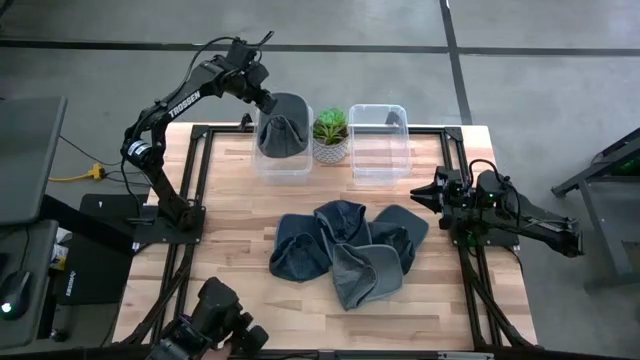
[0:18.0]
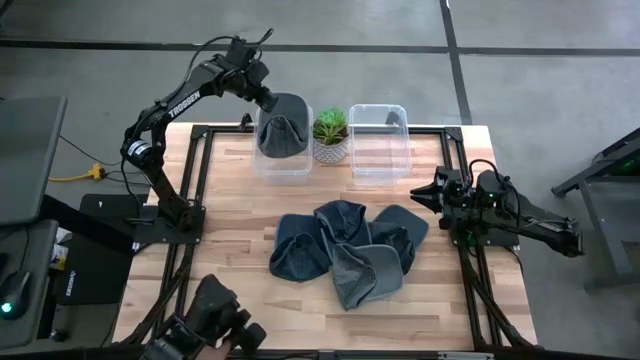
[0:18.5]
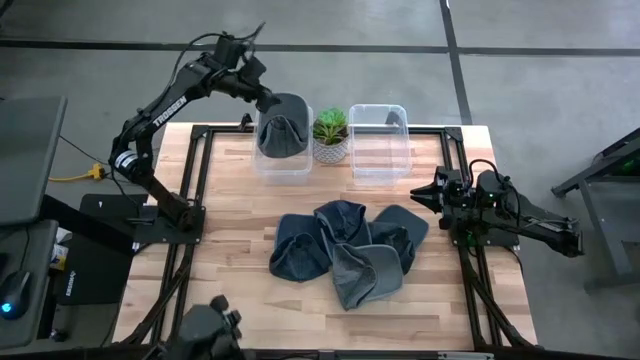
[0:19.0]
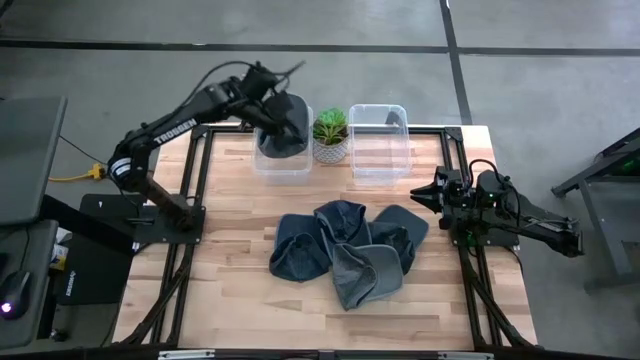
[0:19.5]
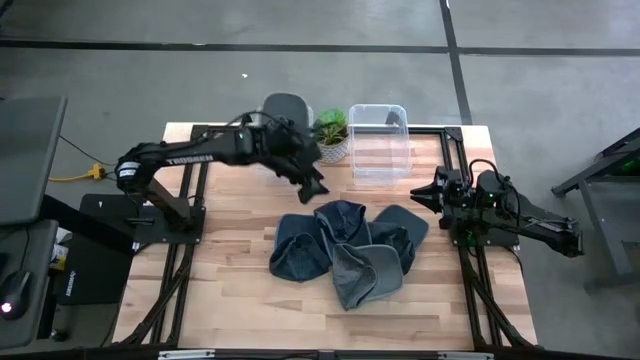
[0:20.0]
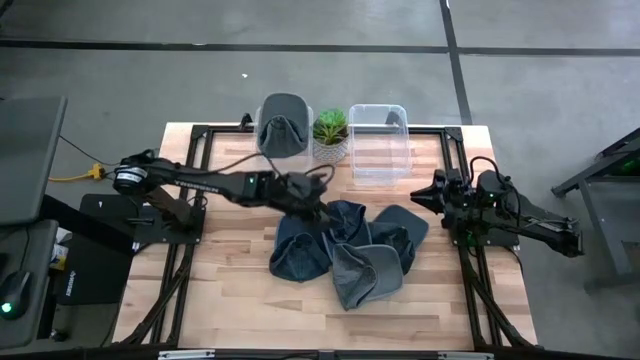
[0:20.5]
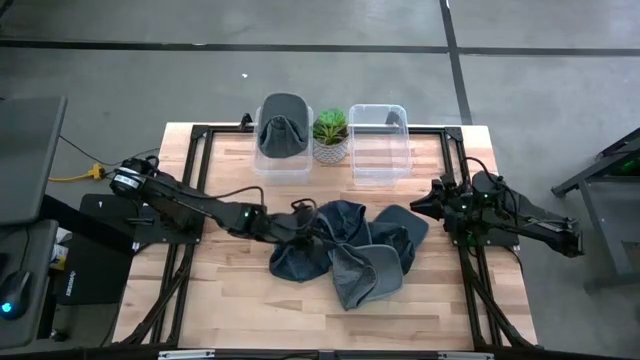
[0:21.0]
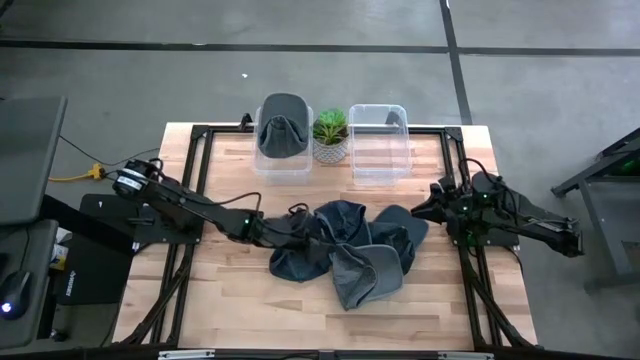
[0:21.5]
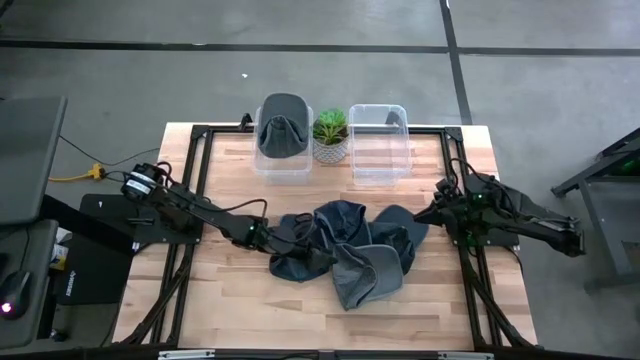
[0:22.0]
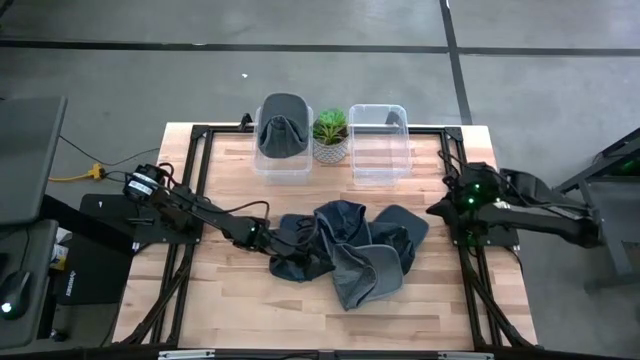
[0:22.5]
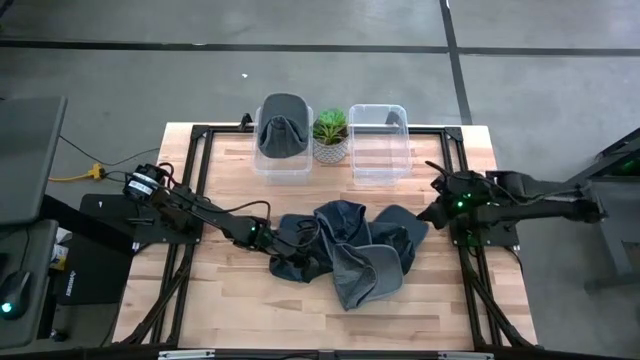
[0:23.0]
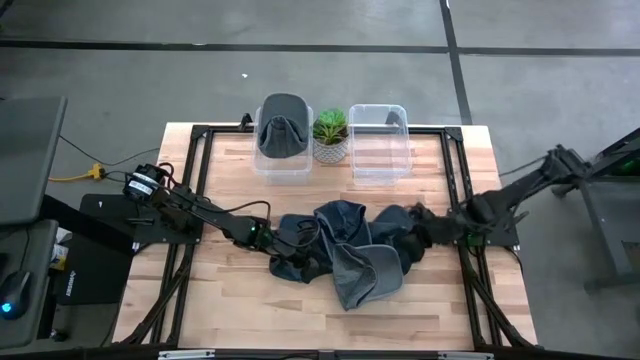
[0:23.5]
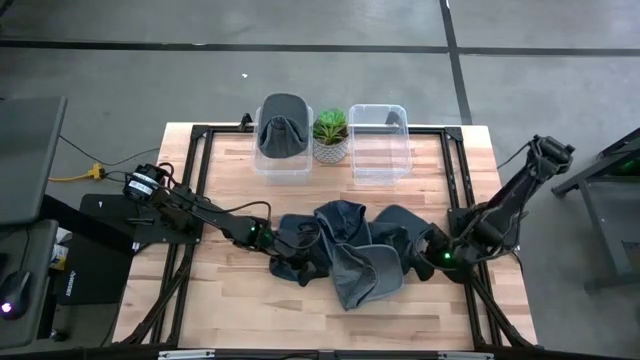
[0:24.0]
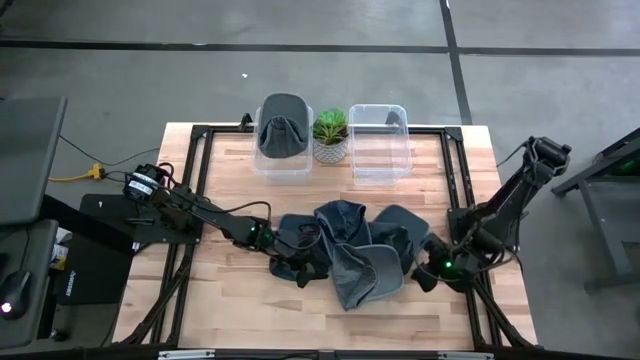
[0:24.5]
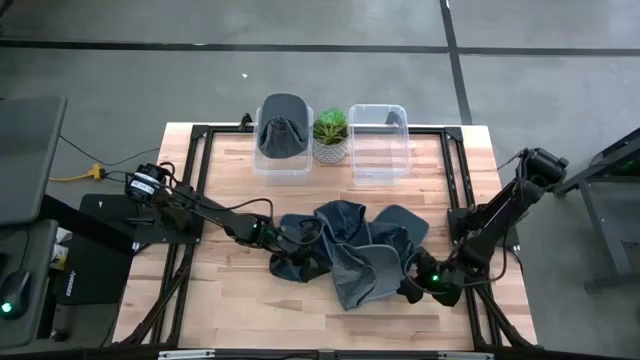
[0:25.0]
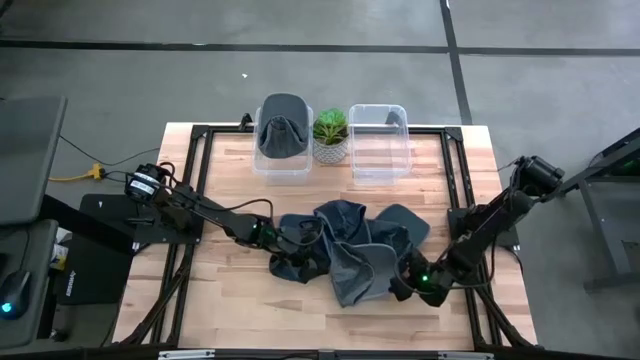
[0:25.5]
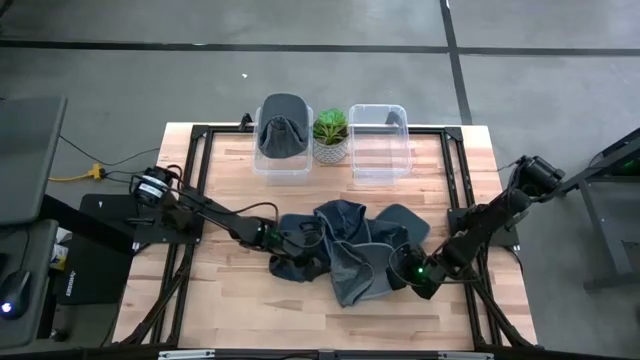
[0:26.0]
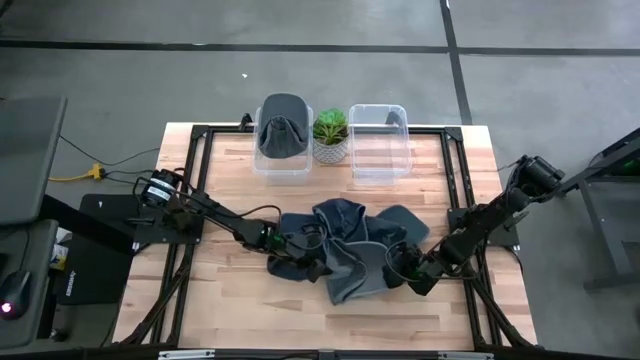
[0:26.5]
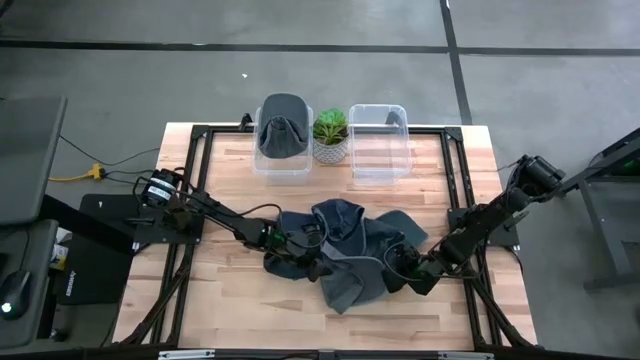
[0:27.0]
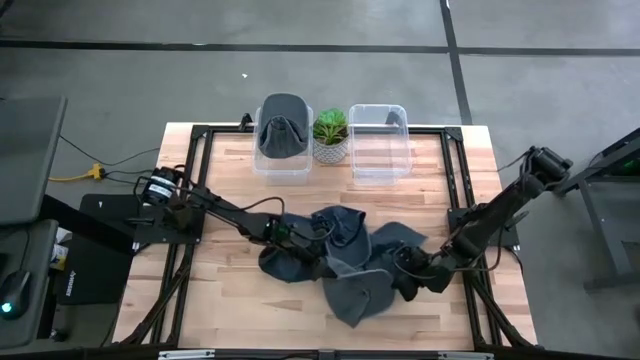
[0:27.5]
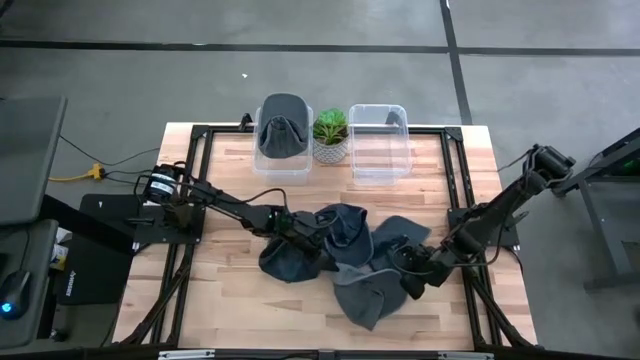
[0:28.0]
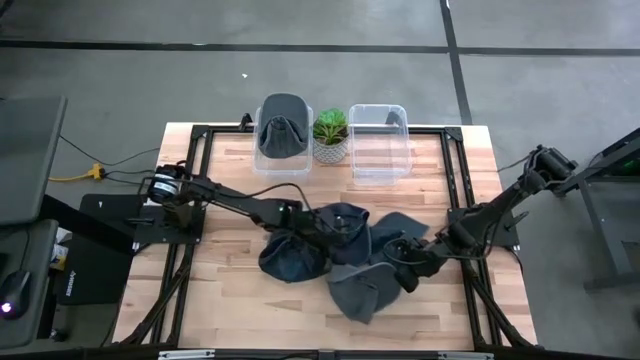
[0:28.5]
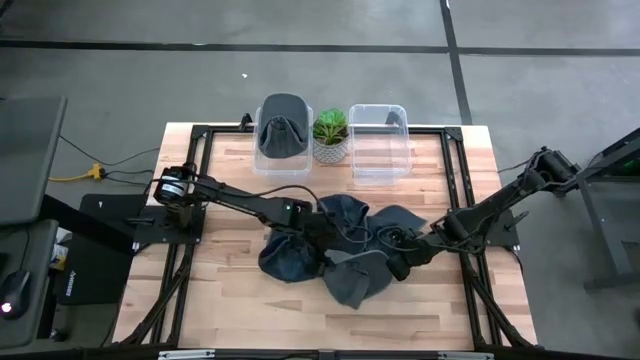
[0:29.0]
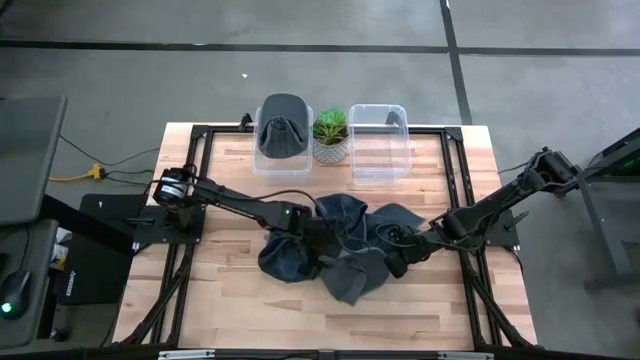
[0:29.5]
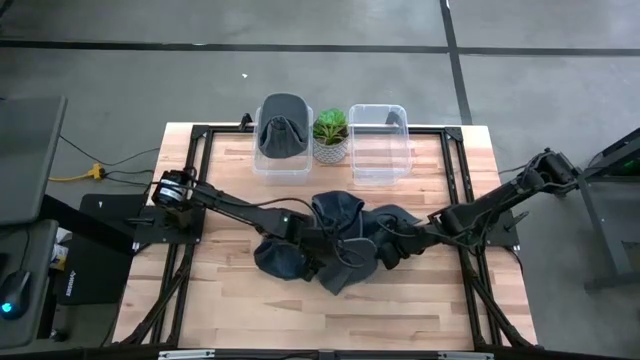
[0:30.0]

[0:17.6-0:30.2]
Task: Pick & Place hat
Put the gray cap into the left transparent bin

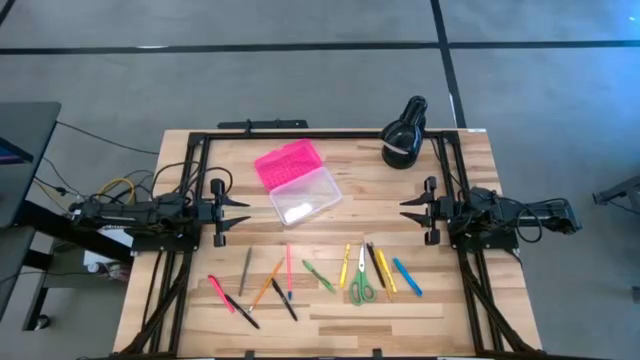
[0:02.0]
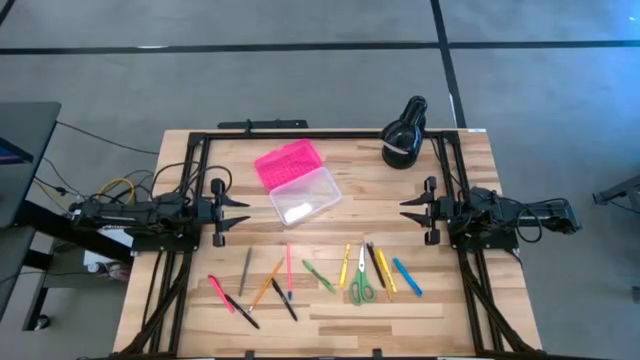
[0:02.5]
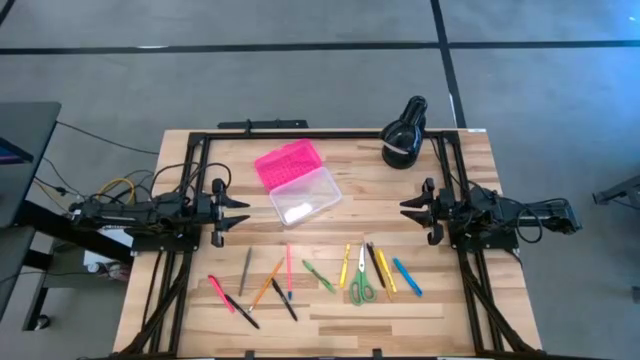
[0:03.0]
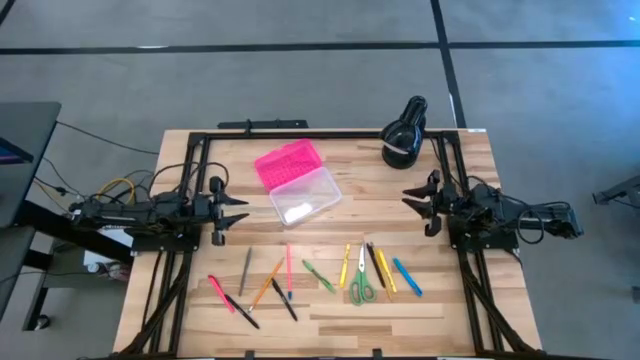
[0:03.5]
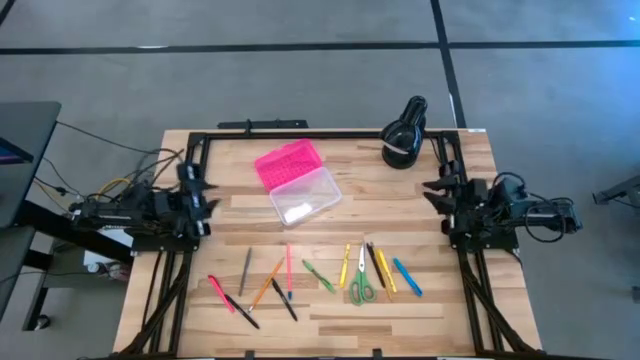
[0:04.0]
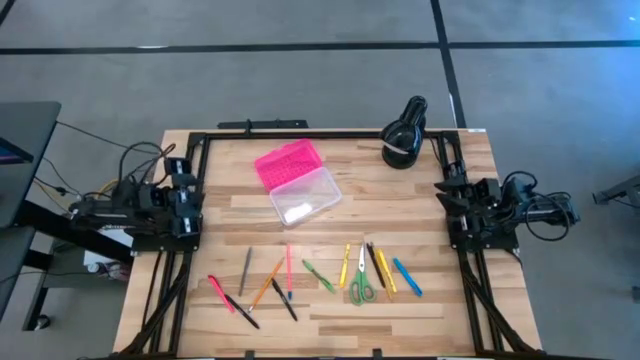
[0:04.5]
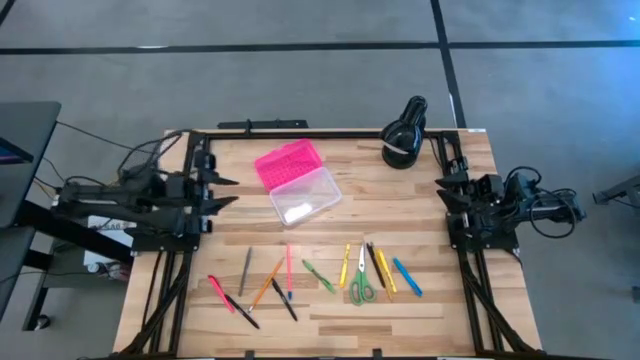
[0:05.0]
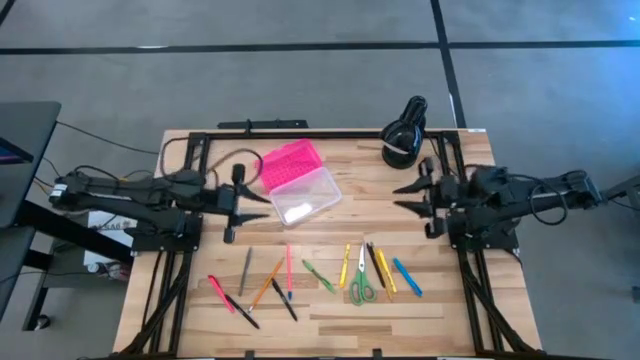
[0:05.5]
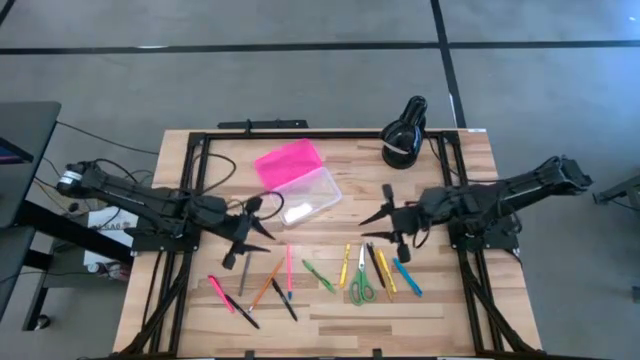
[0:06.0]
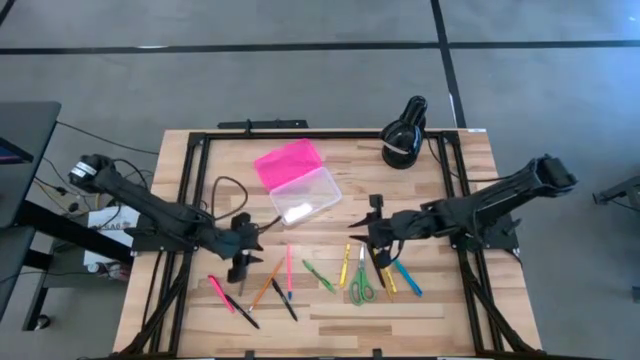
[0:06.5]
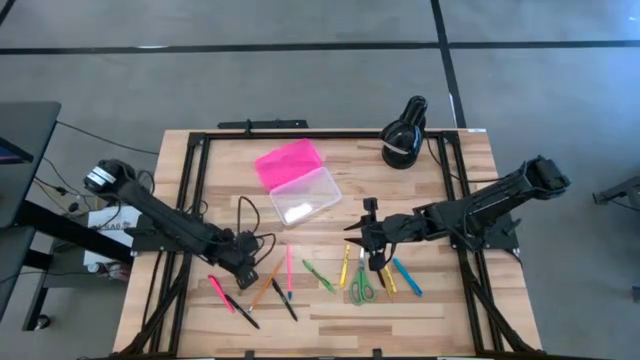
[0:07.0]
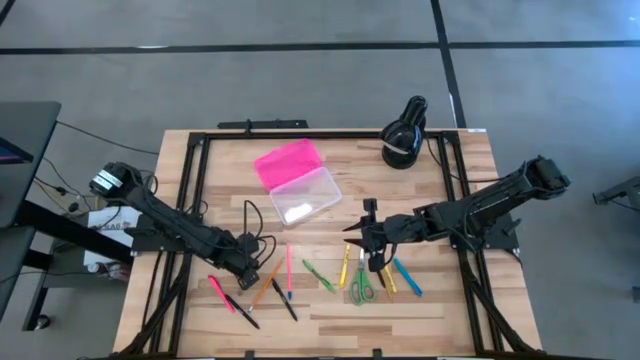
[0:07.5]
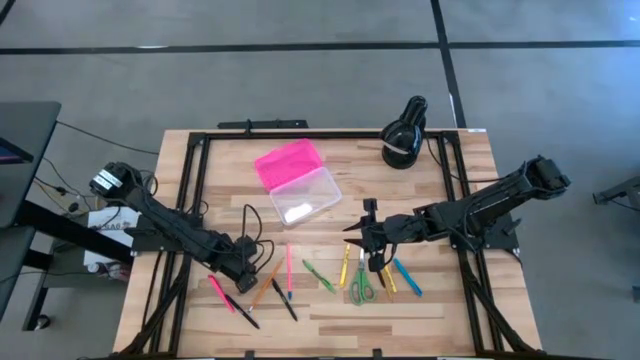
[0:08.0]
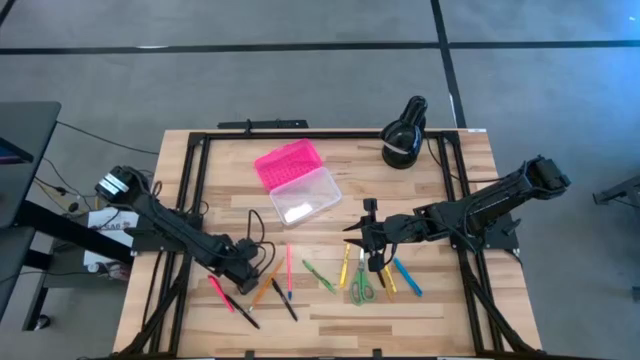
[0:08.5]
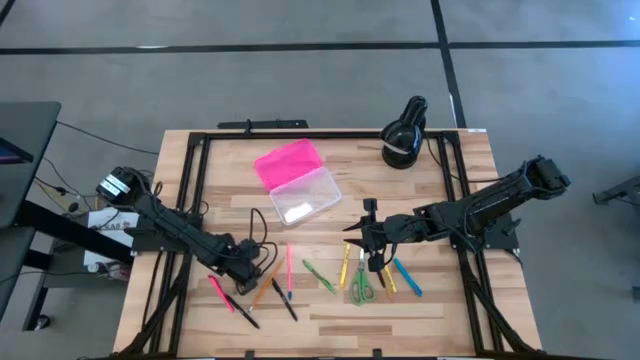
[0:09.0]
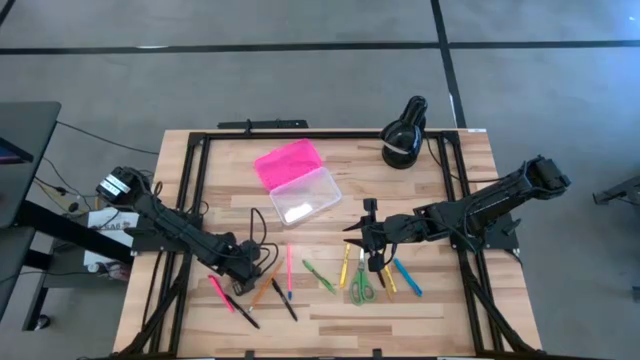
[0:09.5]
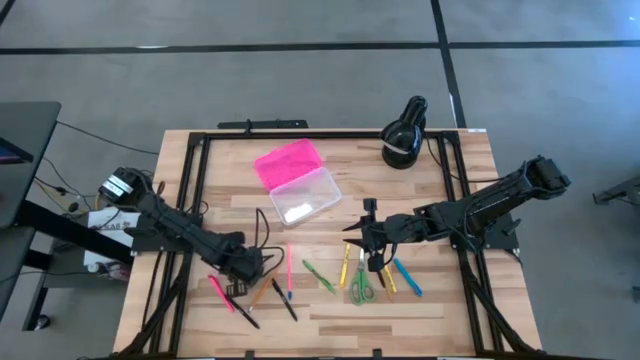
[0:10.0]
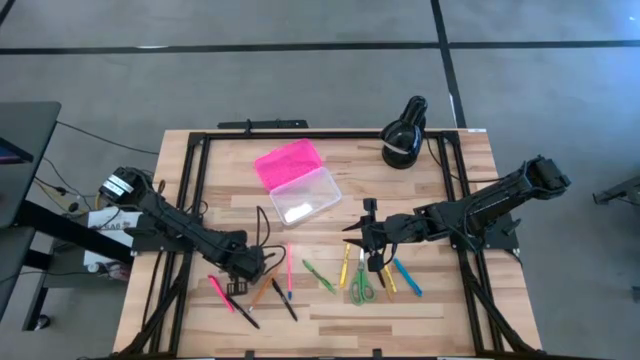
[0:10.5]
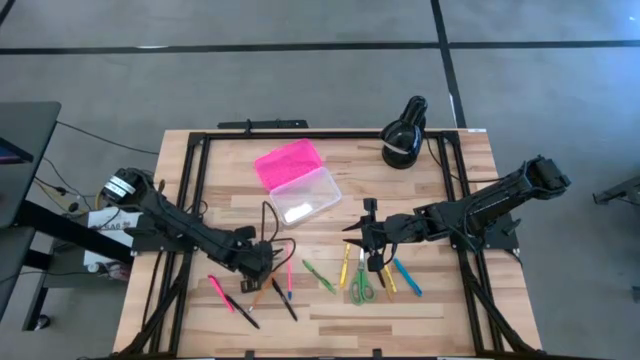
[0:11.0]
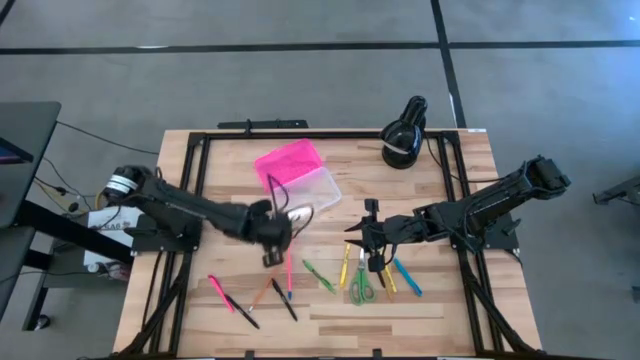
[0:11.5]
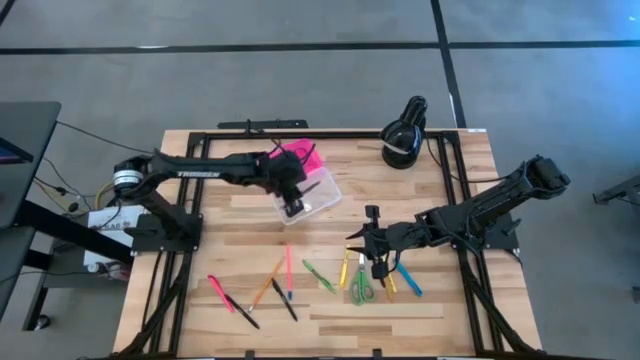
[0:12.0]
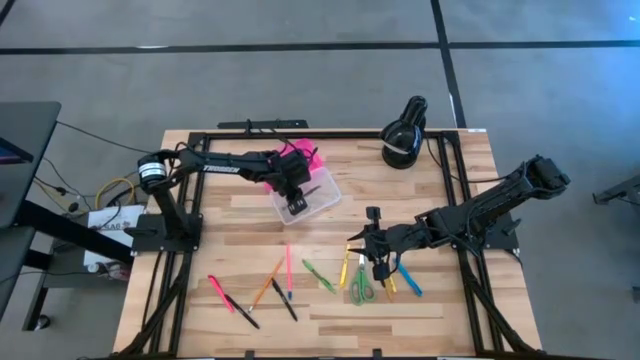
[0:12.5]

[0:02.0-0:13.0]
Task: Pick & place school supplies into a supply box
Put the gray pen into the black supply box
